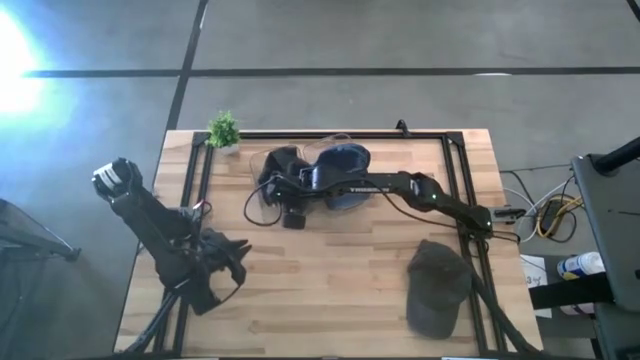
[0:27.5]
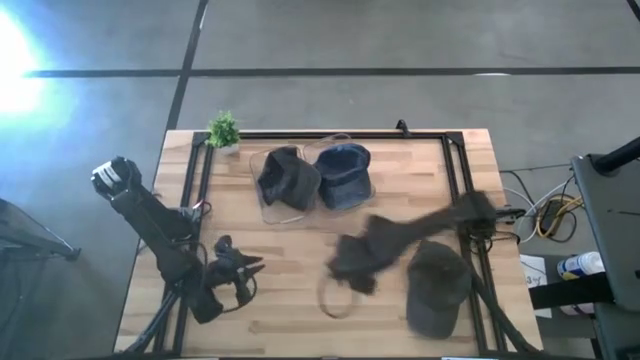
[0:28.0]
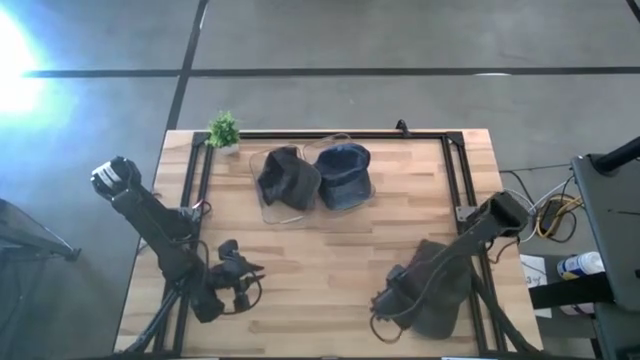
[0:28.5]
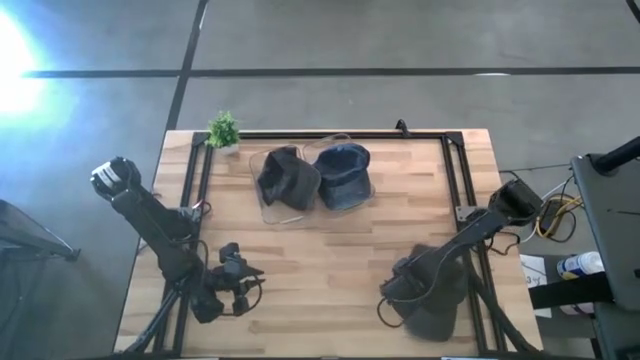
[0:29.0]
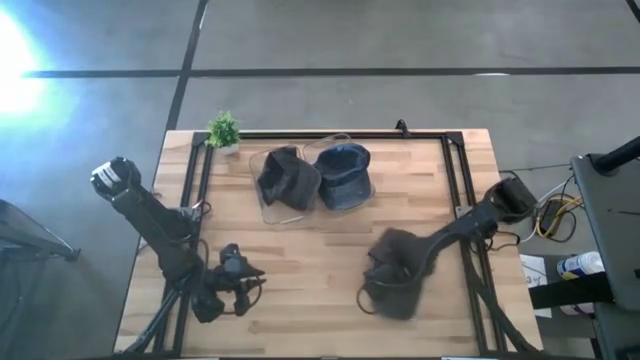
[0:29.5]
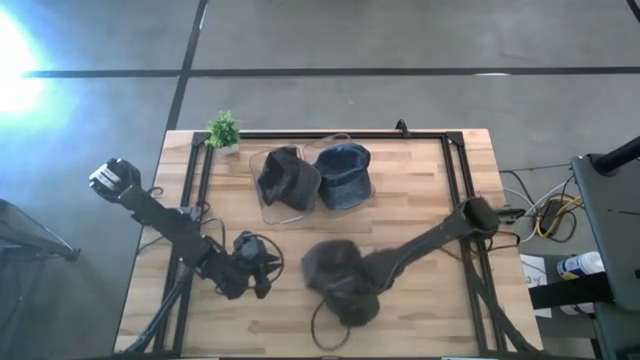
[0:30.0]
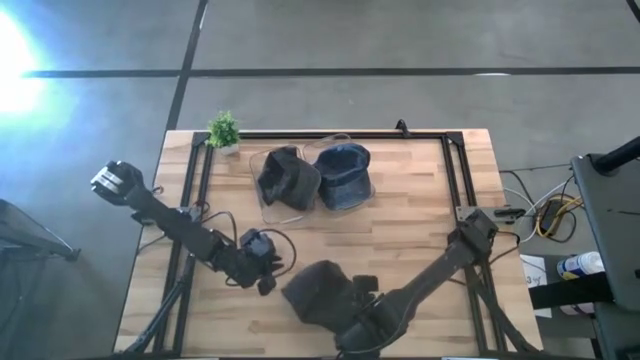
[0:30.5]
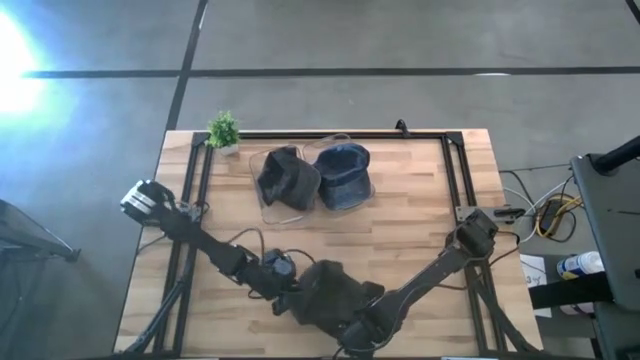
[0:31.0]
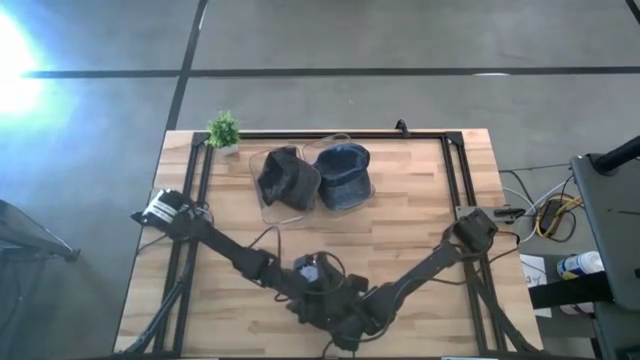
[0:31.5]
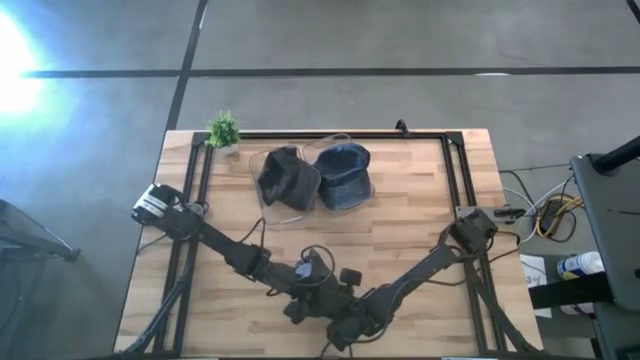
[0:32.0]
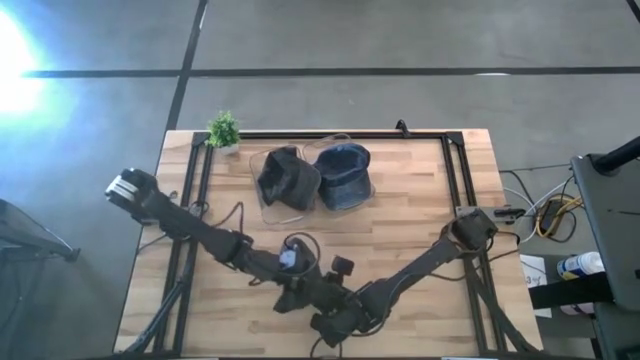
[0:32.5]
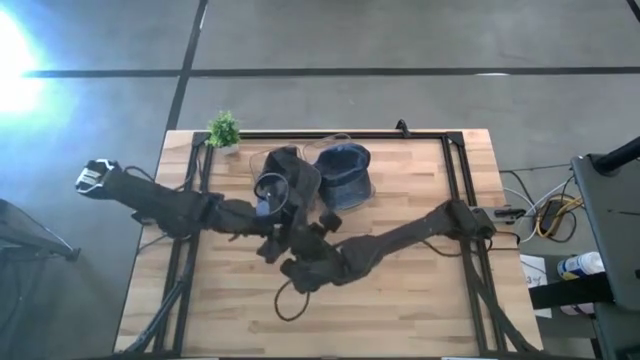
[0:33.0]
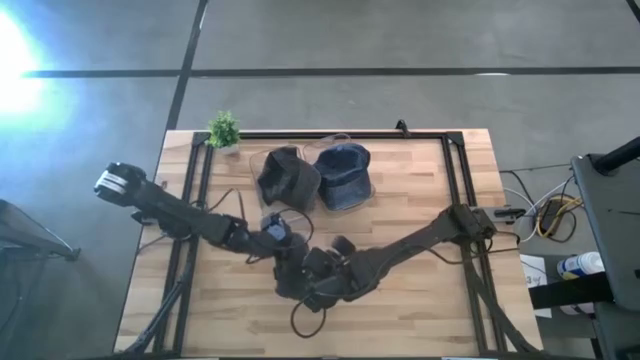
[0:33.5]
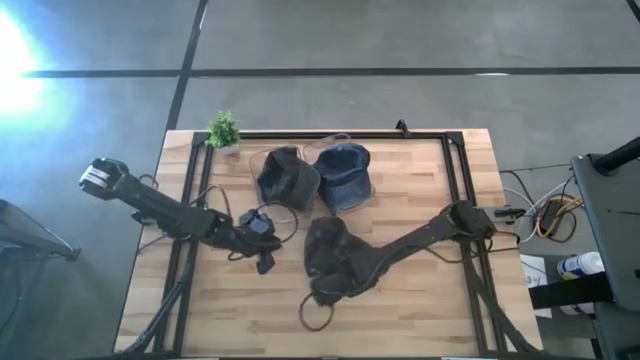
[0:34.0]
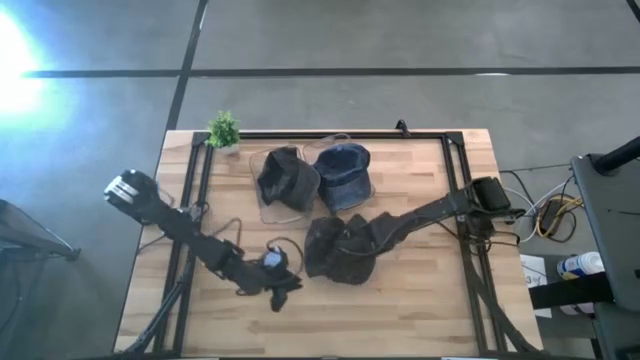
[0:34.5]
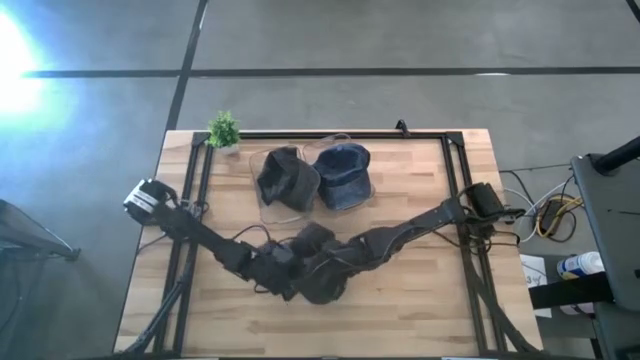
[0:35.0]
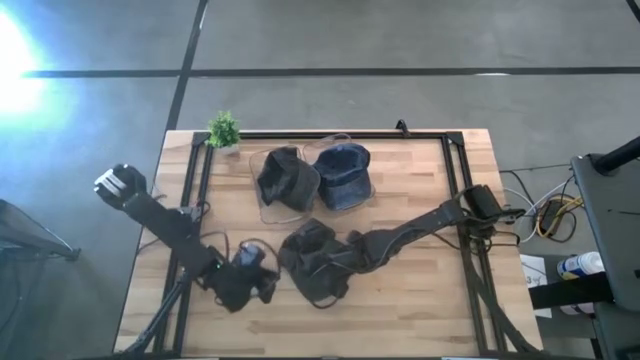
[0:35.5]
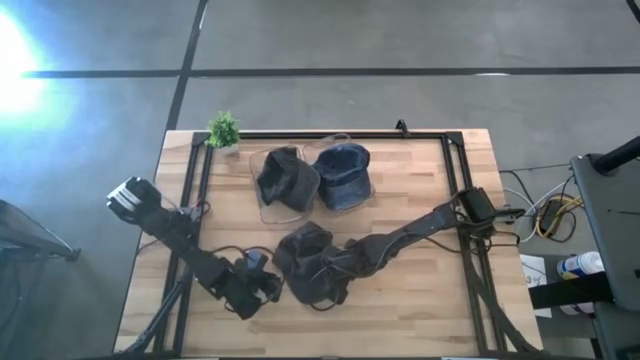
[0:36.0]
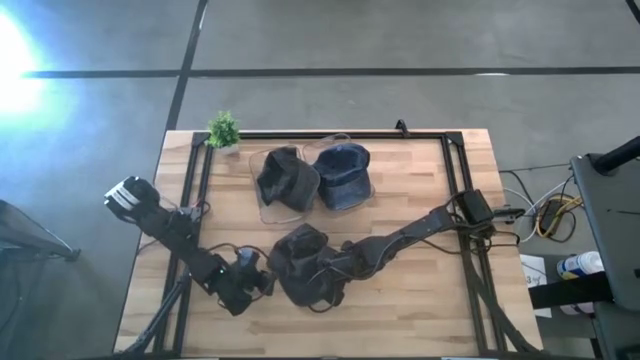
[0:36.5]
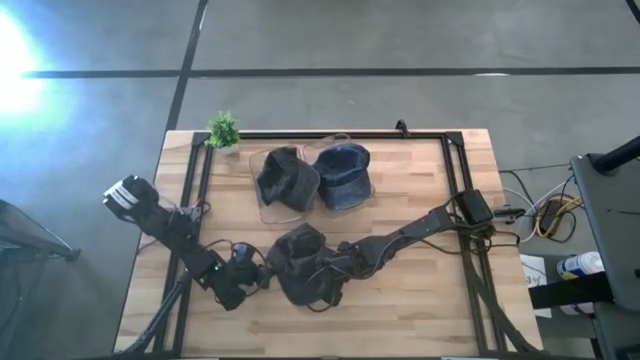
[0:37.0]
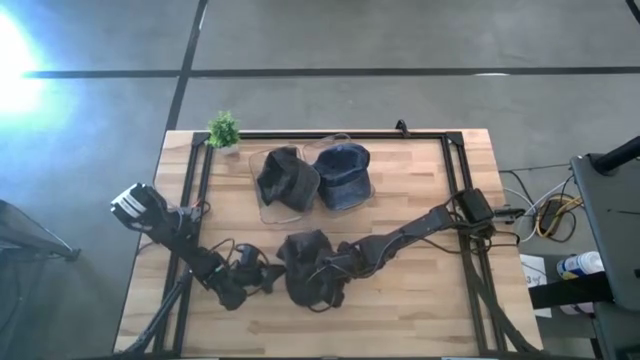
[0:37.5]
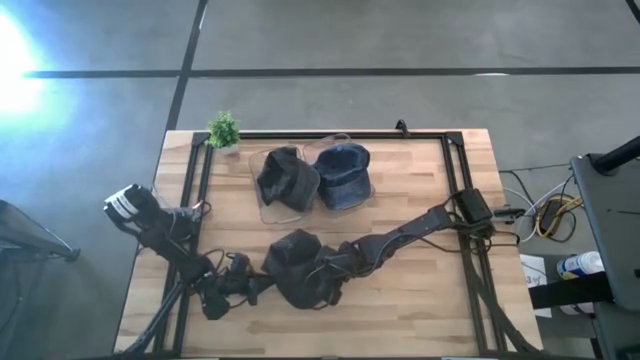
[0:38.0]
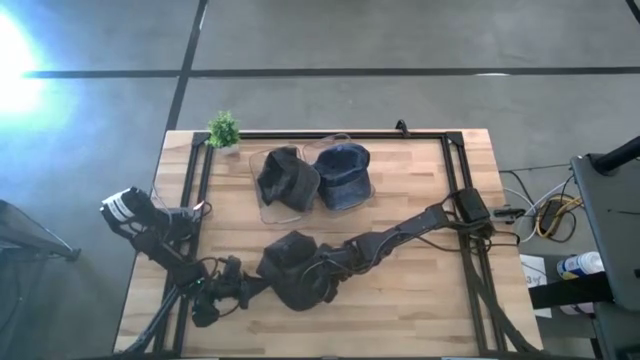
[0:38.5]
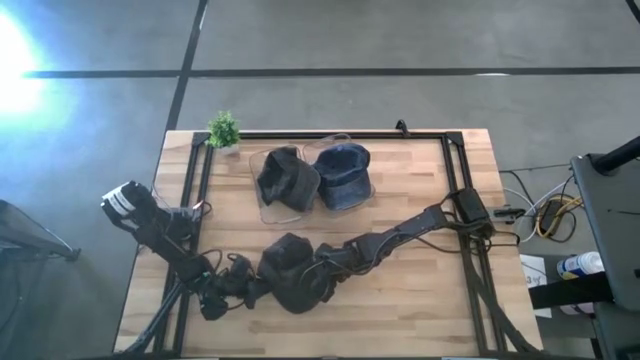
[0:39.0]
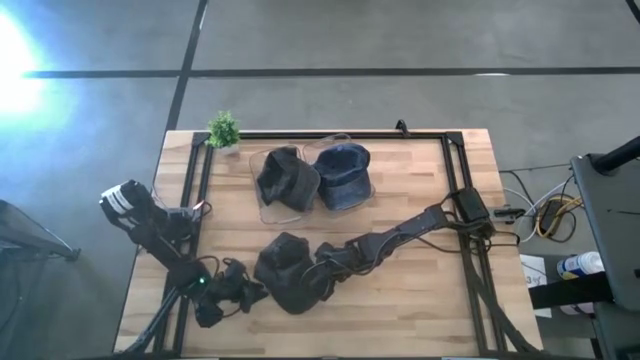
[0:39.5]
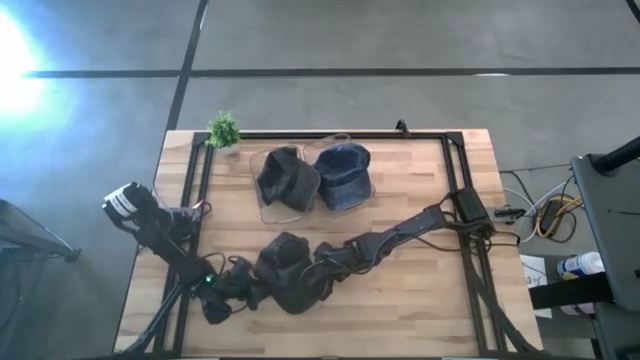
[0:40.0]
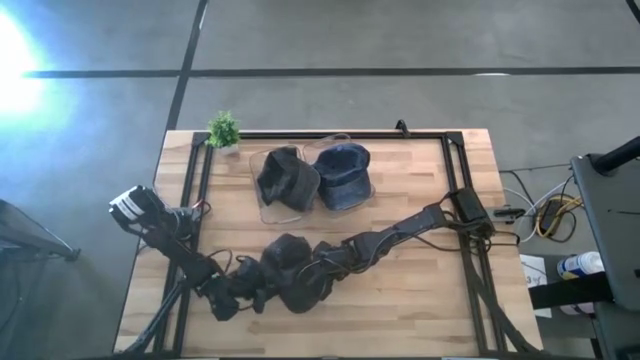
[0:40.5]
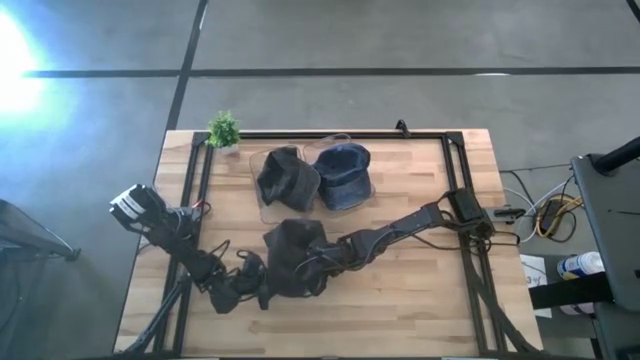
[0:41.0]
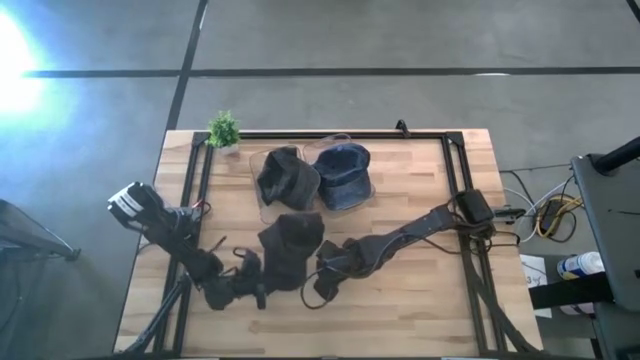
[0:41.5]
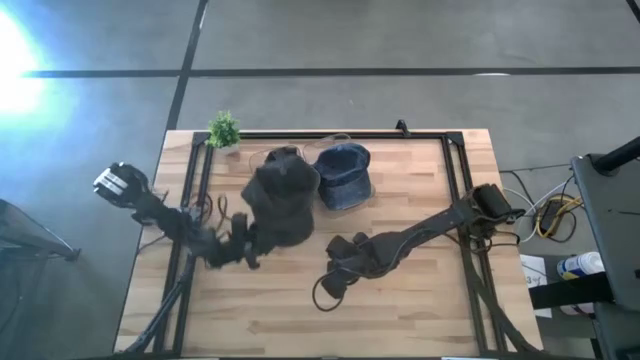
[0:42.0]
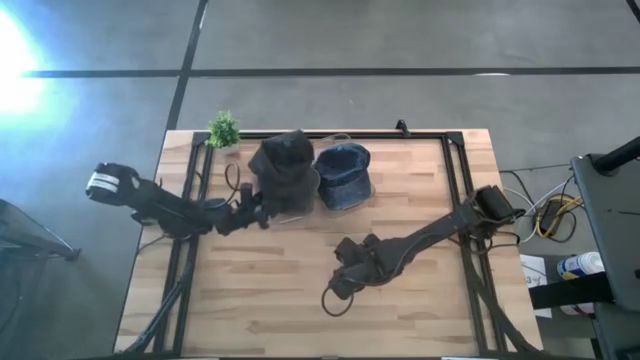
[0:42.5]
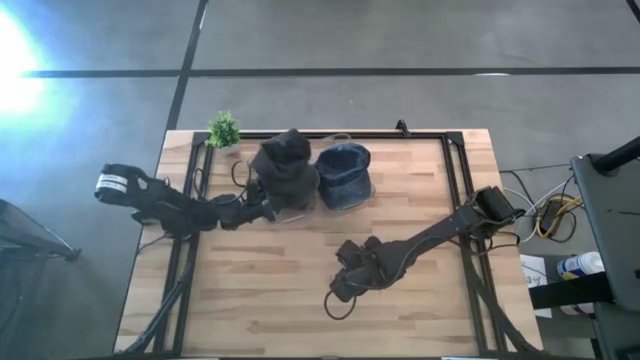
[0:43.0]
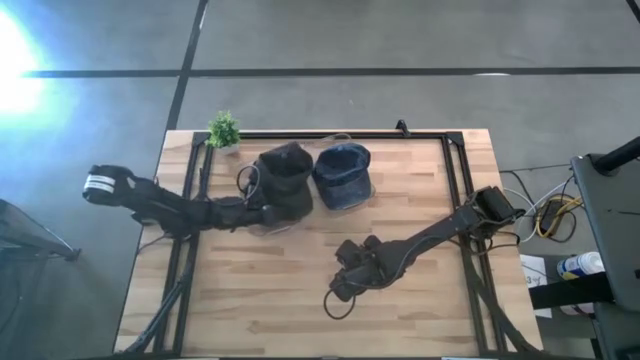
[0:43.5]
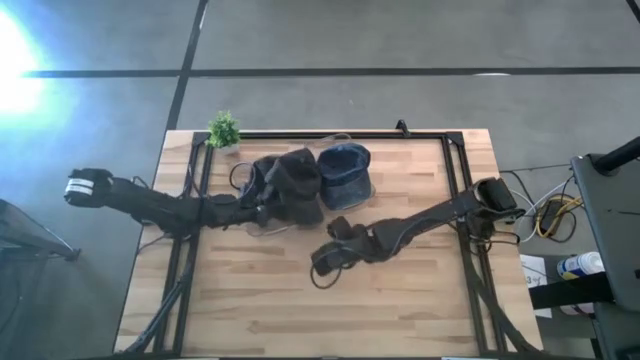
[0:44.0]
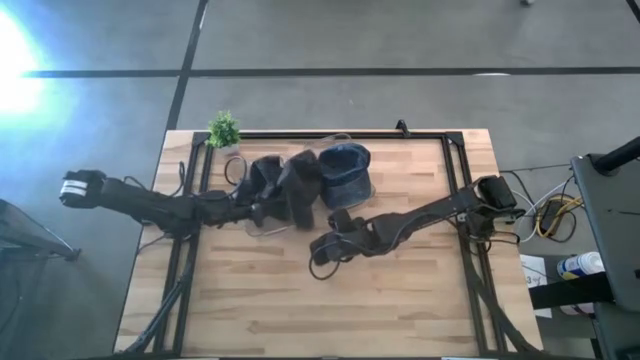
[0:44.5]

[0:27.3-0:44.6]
Task: Pick & Place hat
Put the black cap into the left transparent bin
